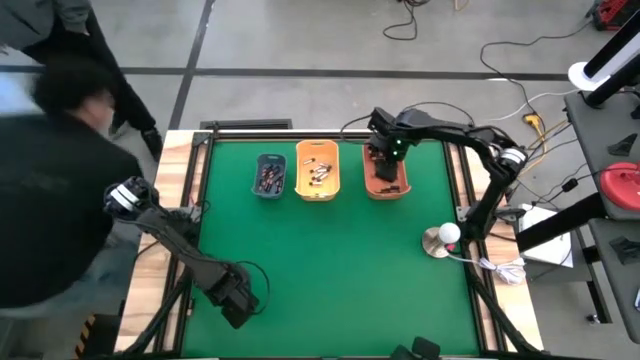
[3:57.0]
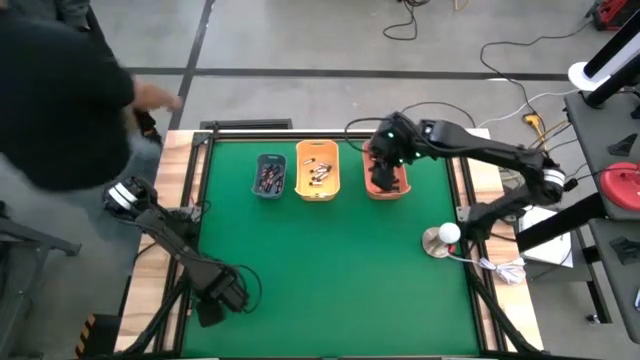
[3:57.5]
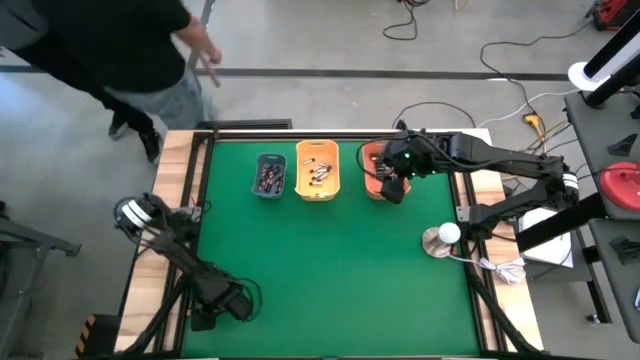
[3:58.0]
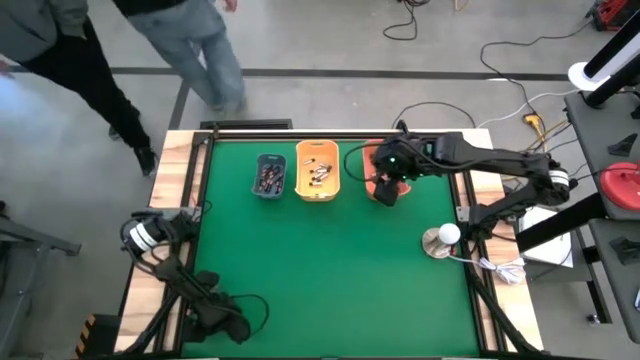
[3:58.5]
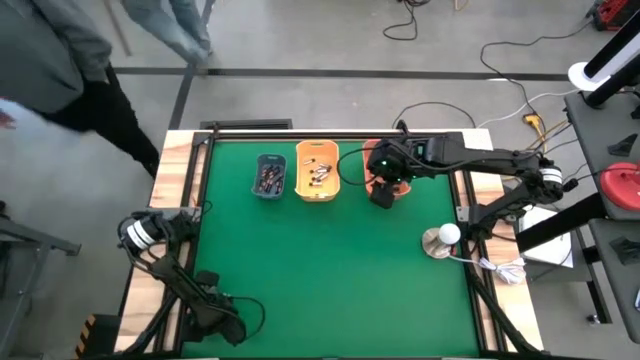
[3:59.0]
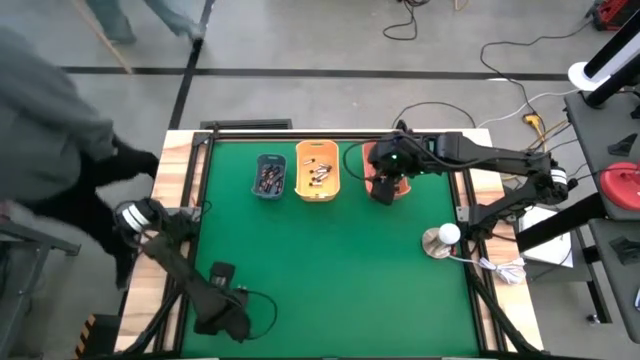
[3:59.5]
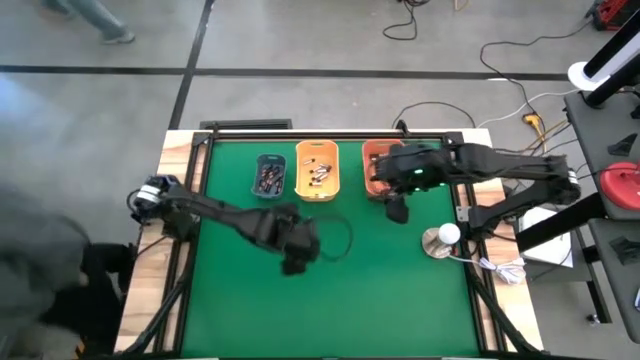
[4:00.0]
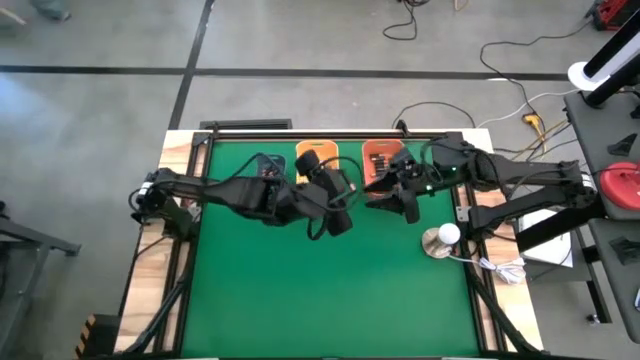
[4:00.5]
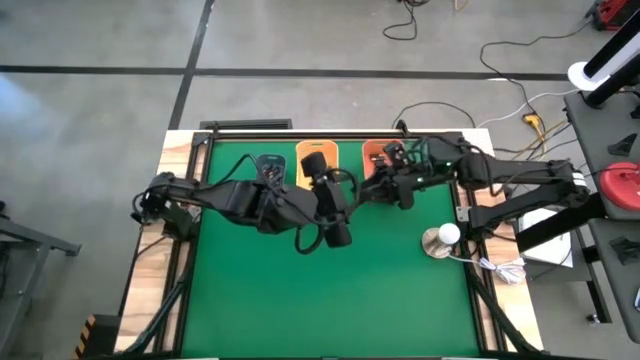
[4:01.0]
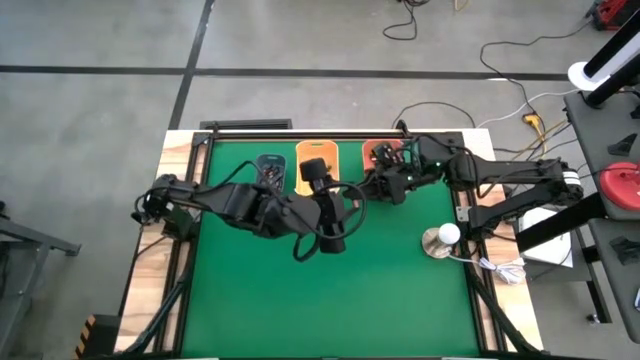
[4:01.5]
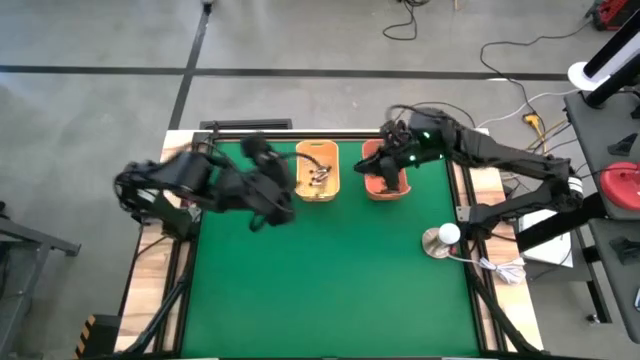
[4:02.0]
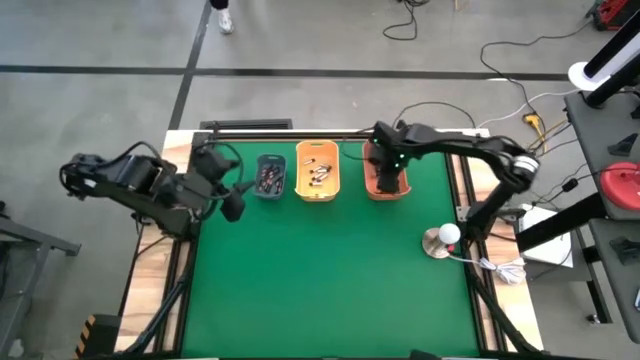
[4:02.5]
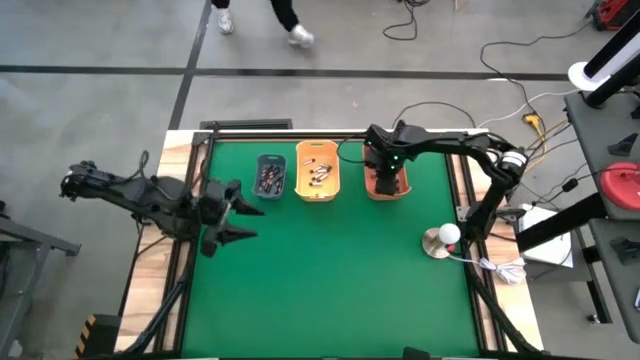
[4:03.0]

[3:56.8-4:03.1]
Task: Sort batteries
Put the gold/black battery into the orange bin

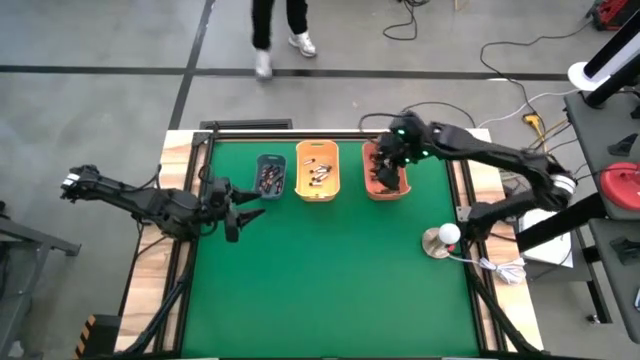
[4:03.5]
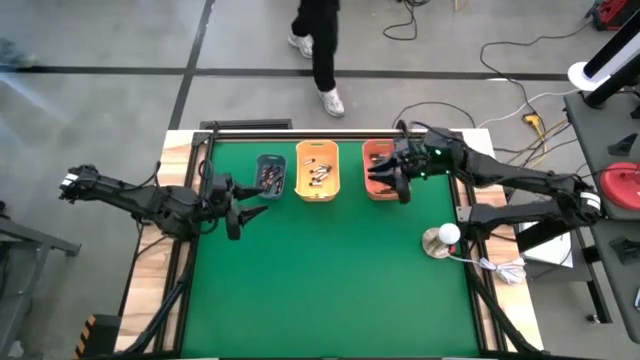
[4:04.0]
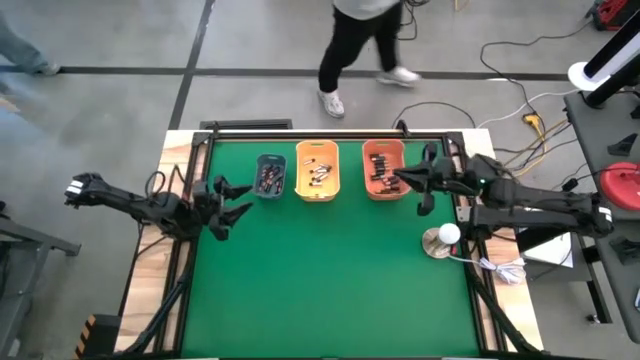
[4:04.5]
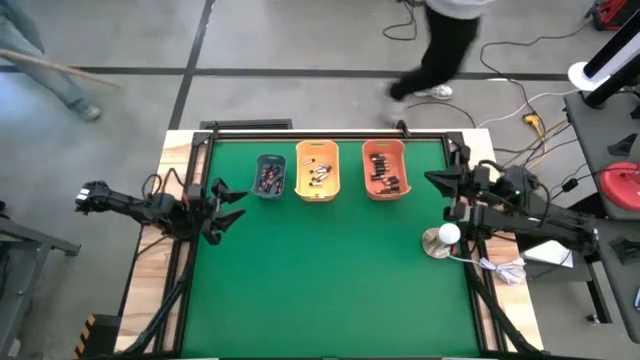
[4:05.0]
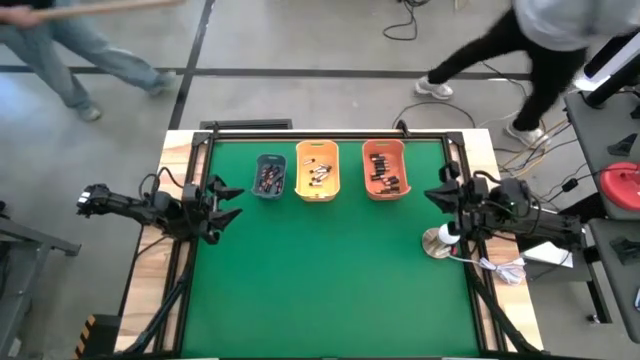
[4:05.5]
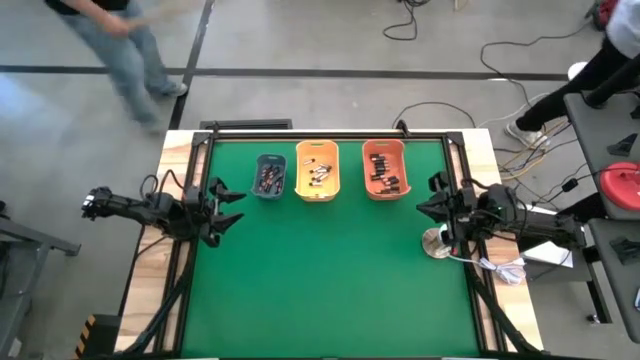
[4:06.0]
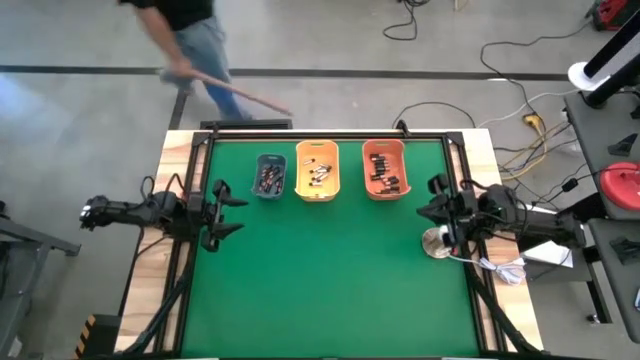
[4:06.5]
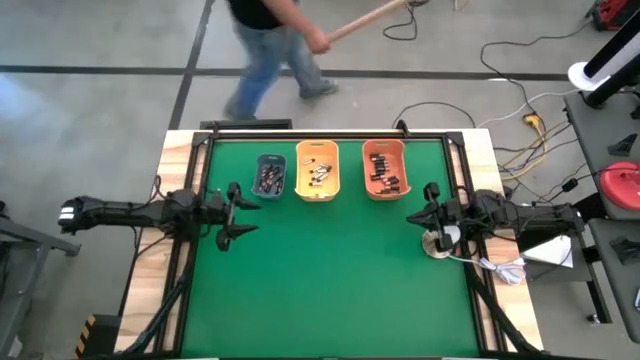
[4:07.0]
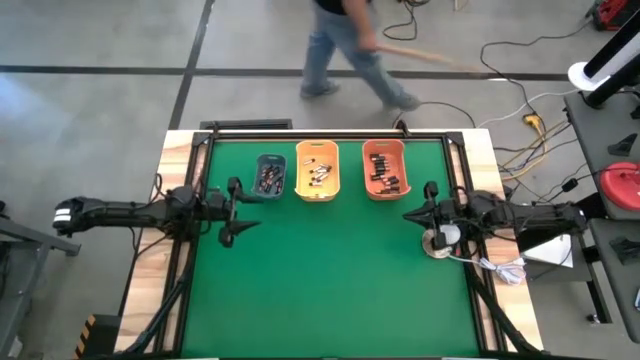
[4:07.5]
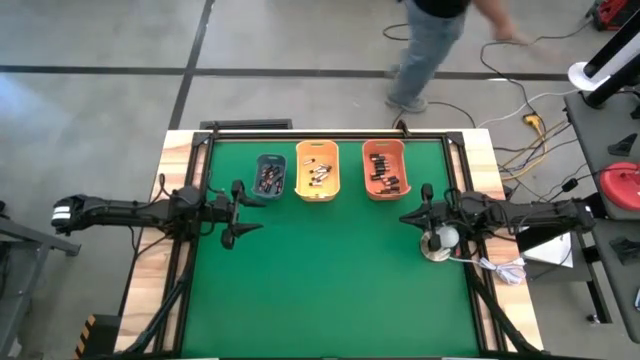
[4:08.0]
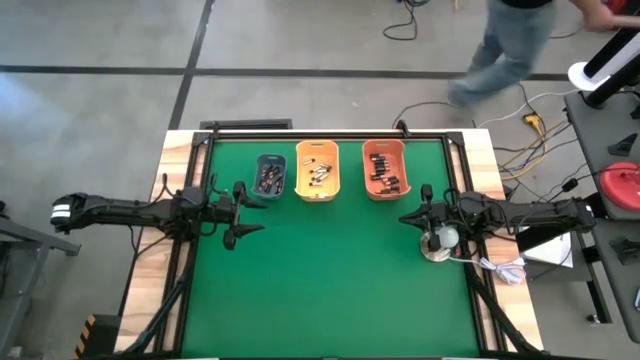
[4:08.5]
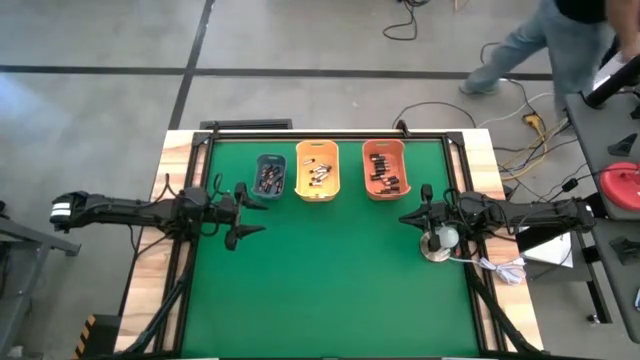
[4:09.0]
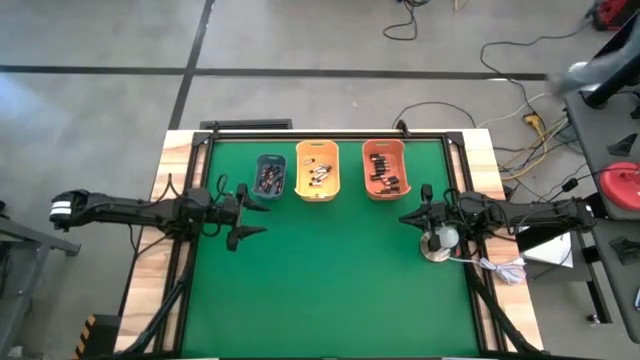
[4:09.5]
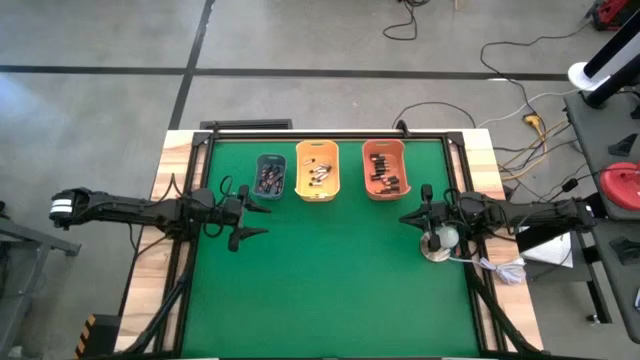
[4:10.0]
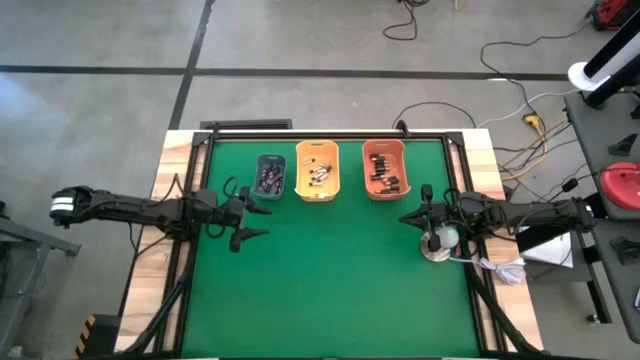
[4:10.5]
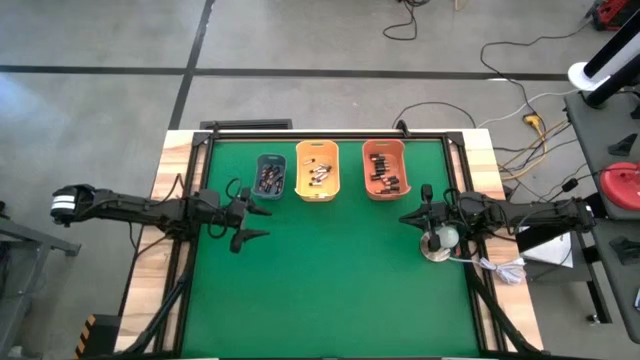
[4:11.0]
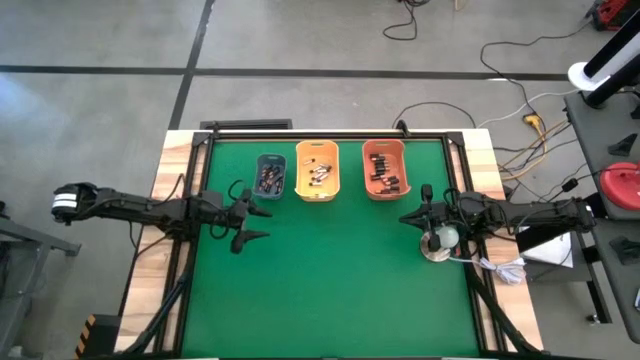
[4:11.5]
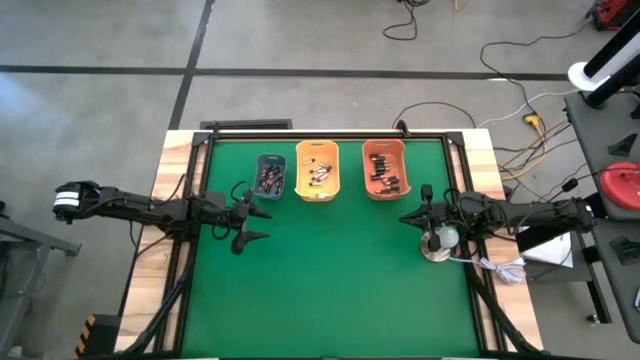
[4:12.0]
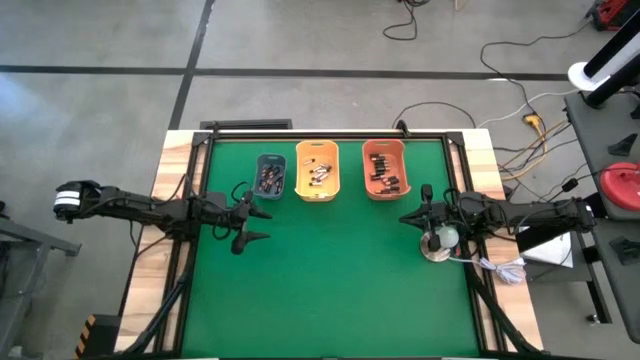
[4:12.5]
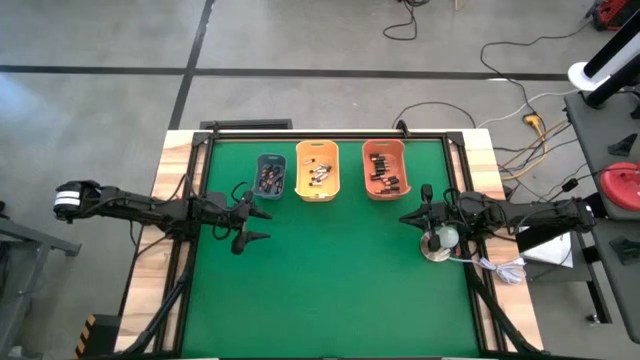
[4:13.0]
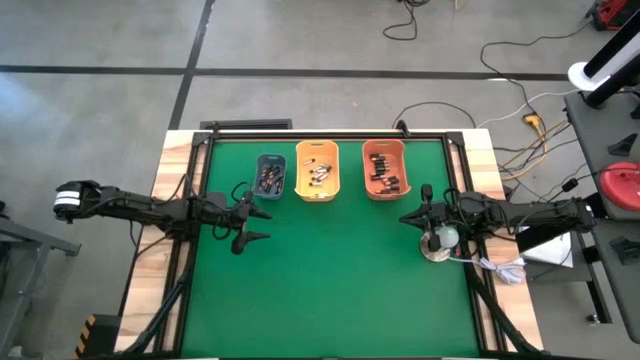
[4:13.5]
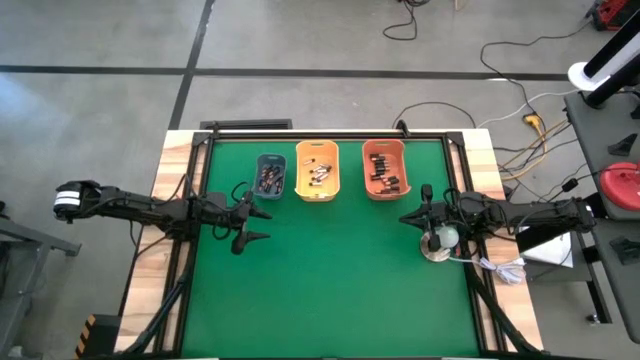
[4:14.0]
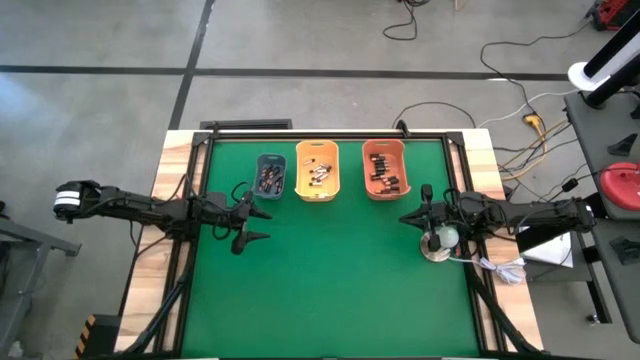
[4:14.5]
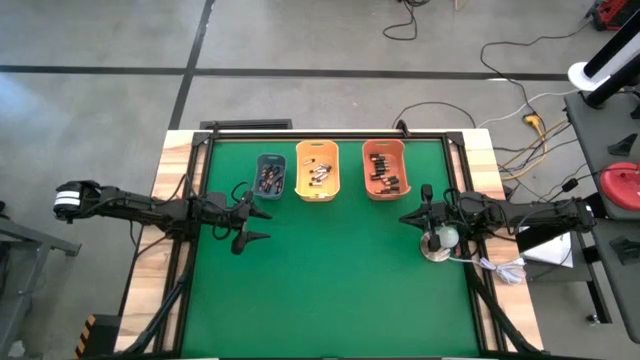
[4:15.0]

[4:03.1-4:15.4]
Return to Home Position

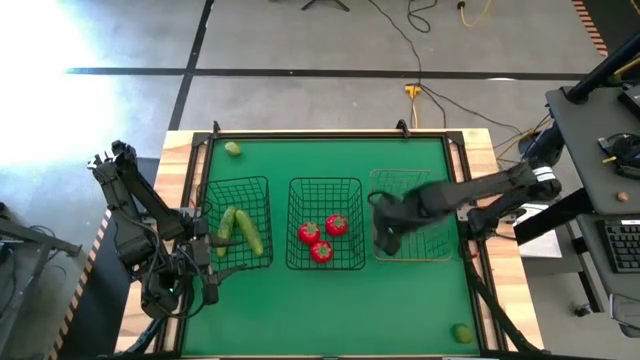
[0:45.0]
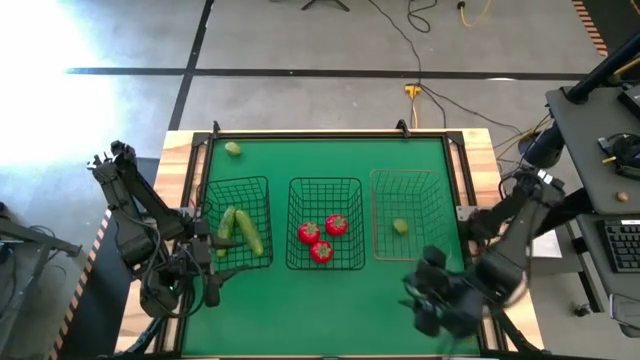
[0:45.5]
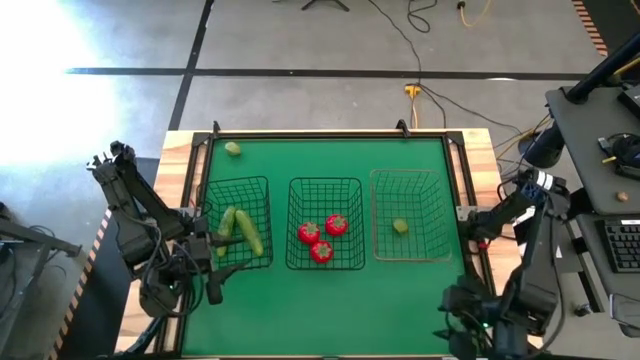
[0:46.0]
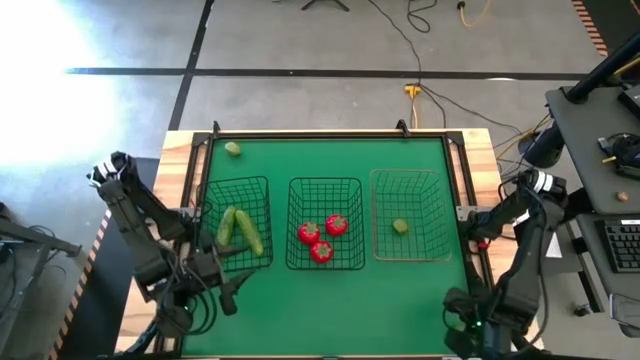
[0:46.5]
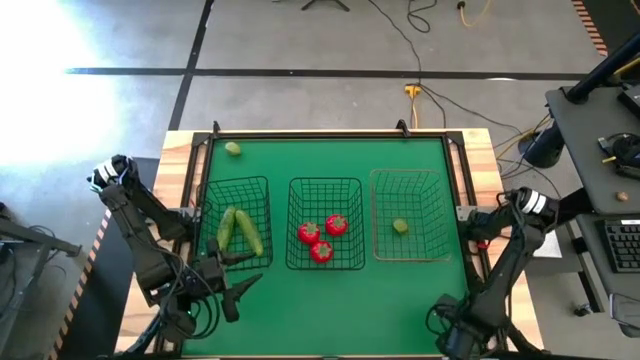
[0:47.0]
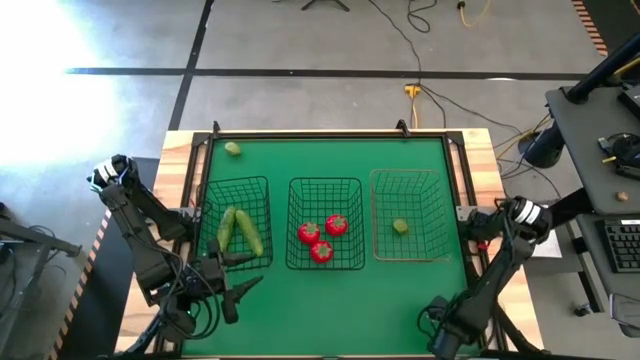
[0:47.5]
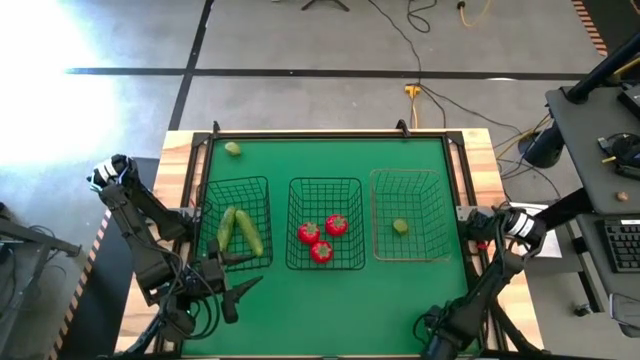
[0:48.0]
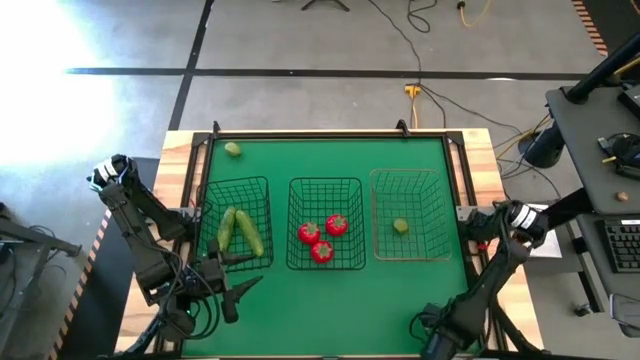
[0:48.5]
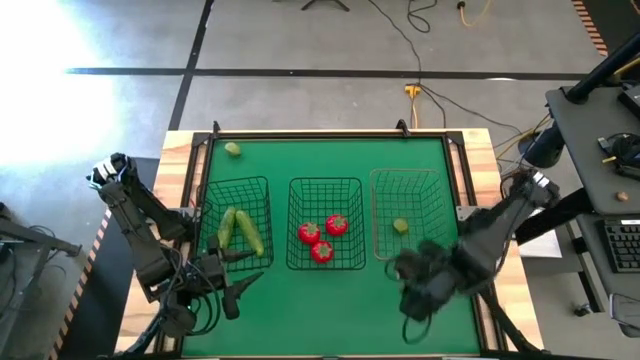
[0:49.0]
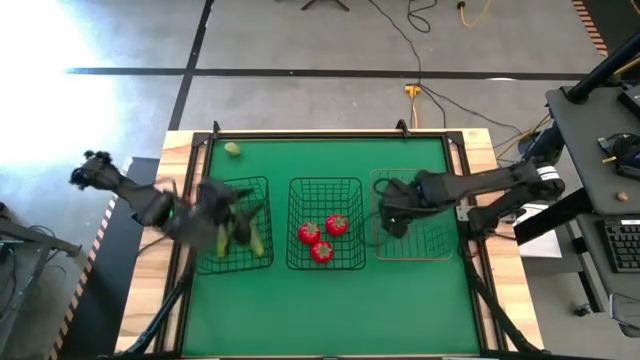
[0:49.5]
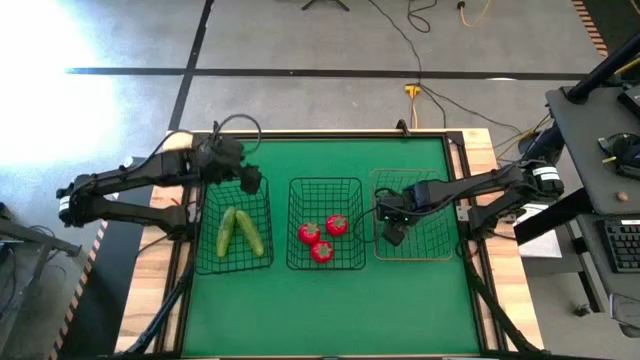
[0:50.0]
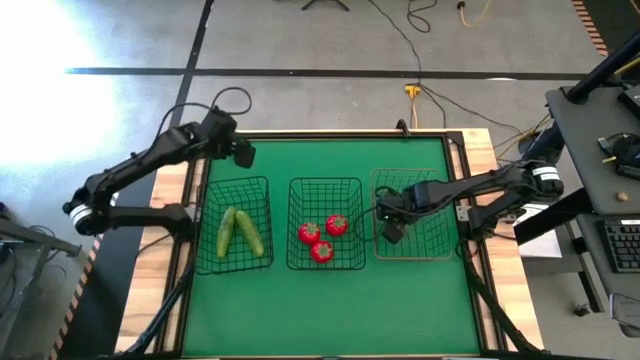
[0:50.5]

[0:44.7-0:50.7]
Task: Sort produce into baskets
Put the bottom lime into the gold wire basket
